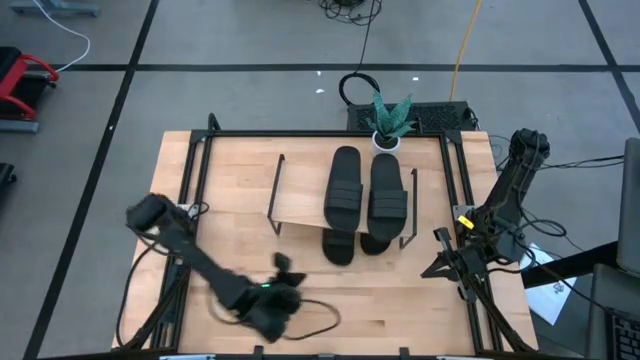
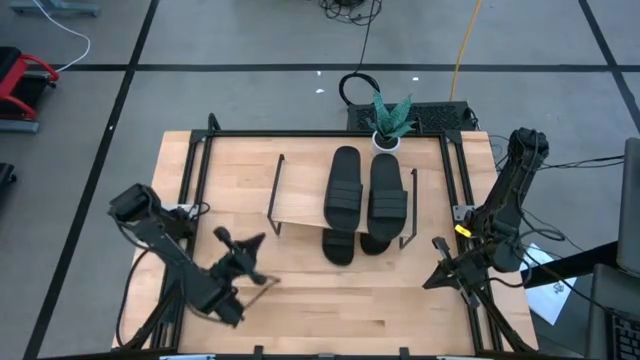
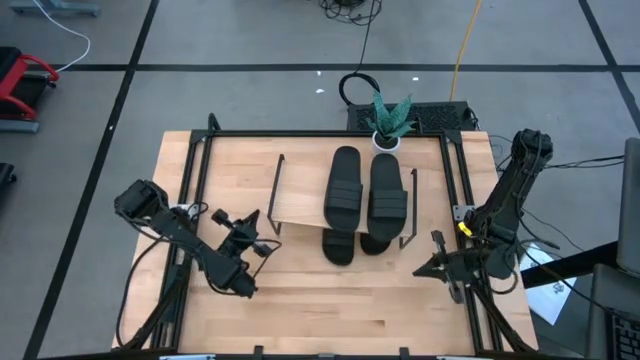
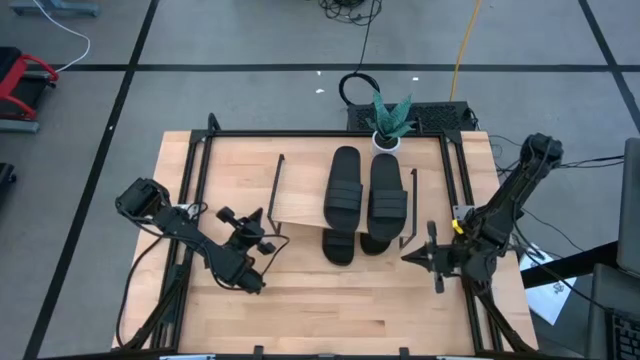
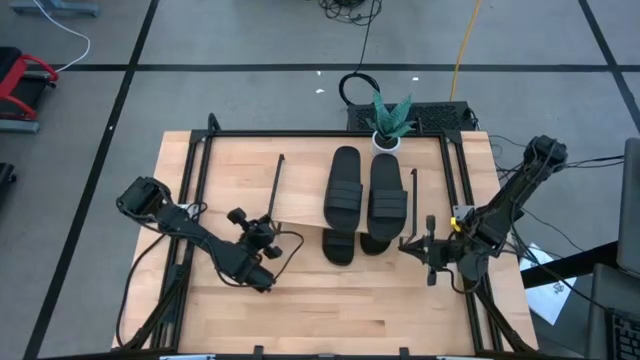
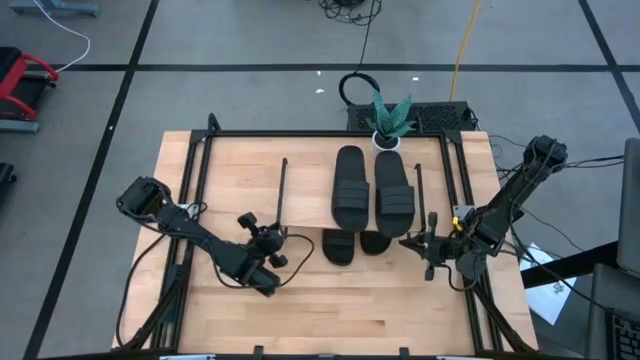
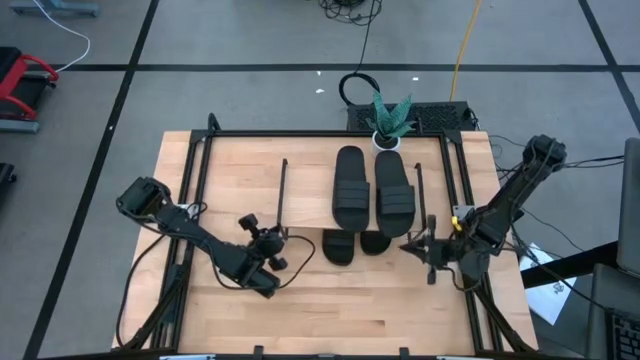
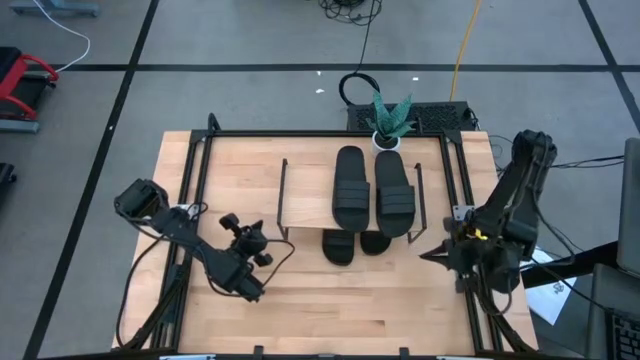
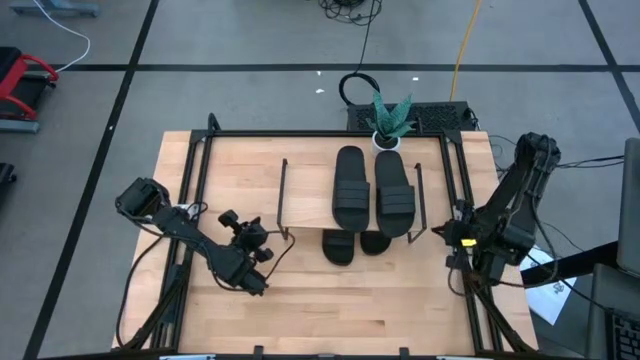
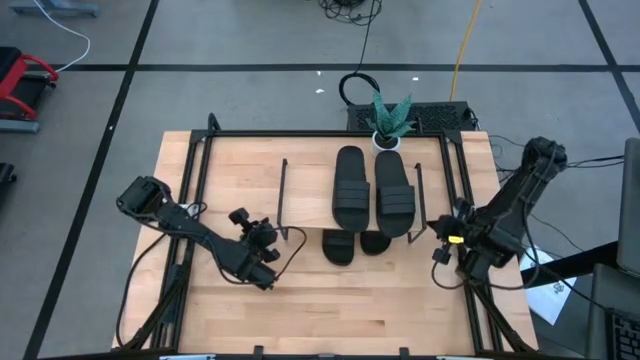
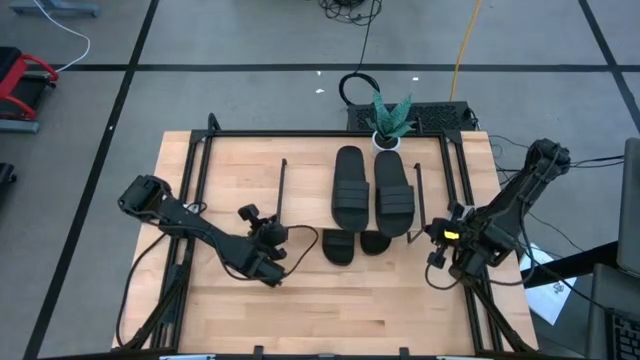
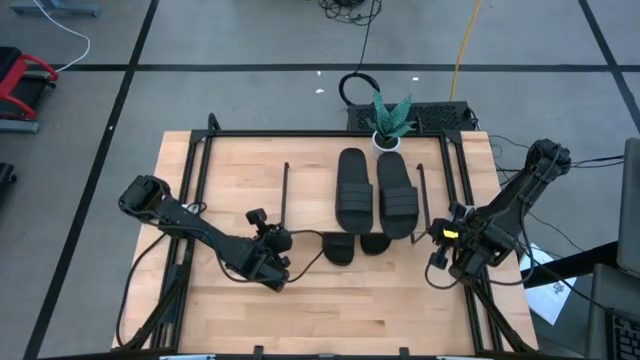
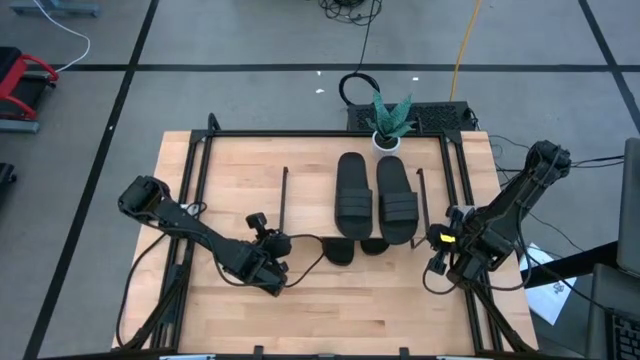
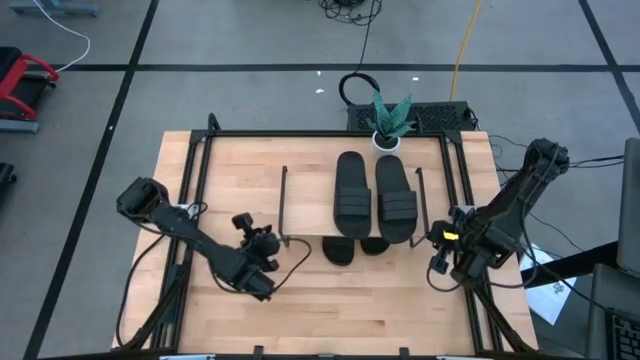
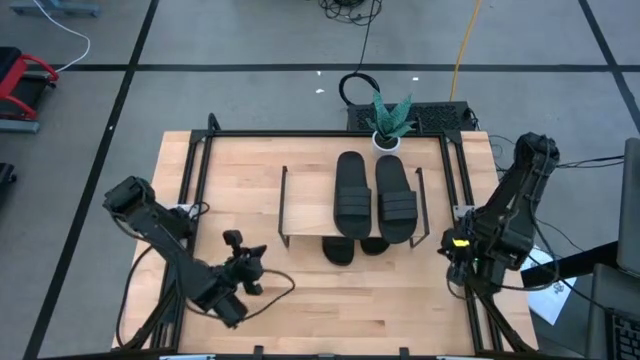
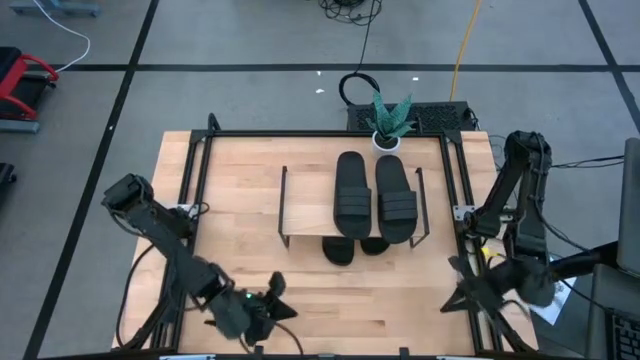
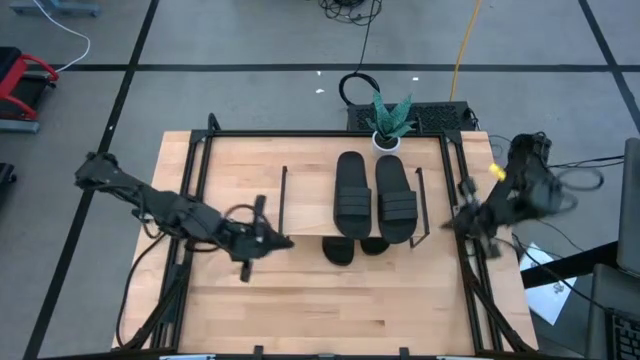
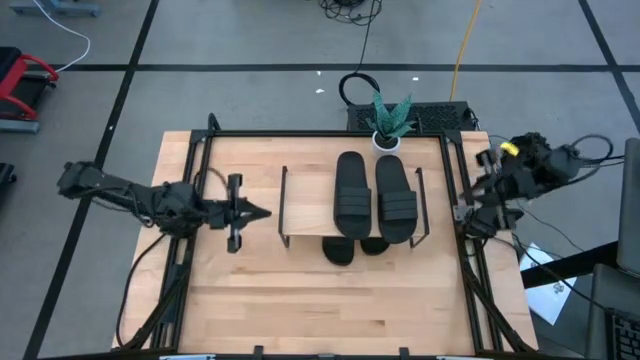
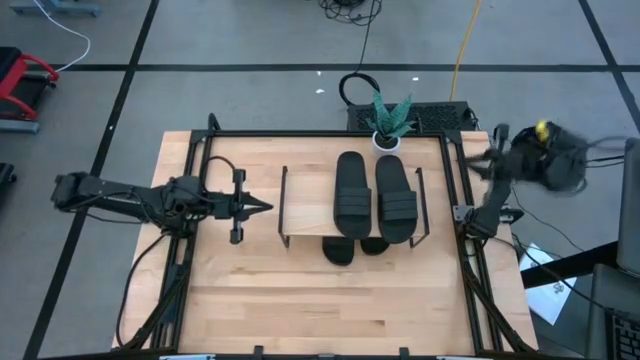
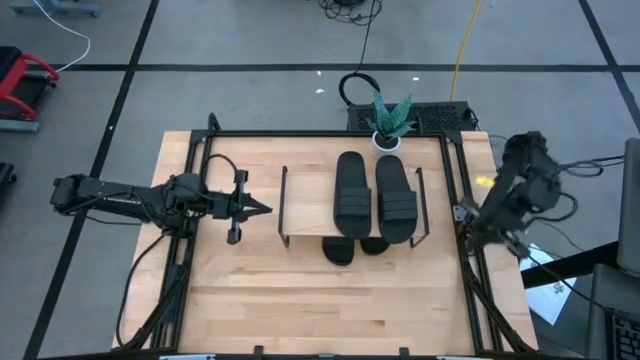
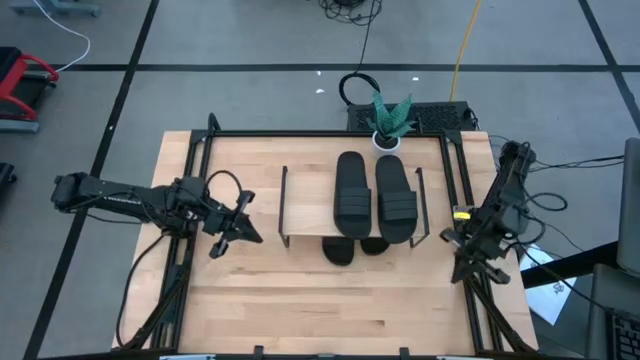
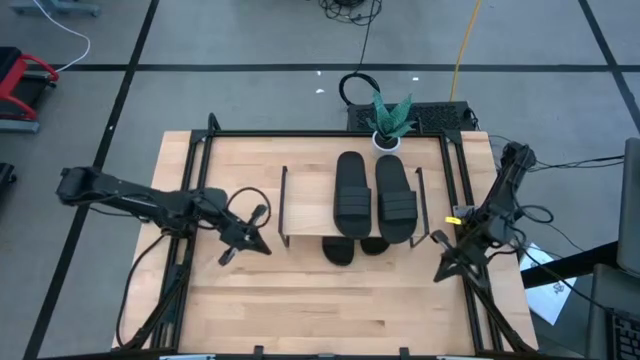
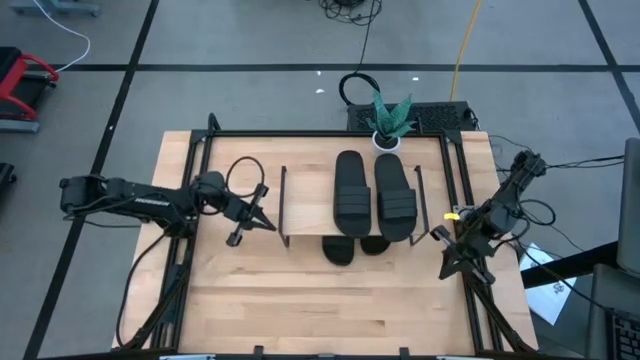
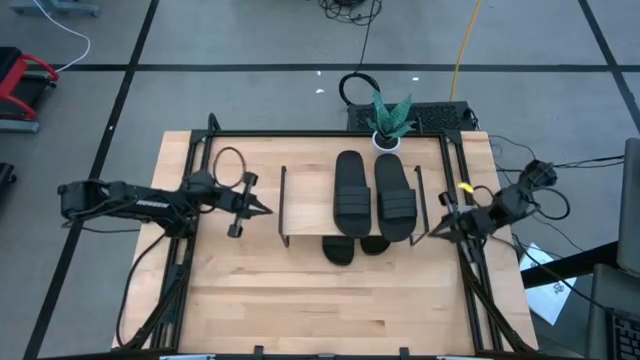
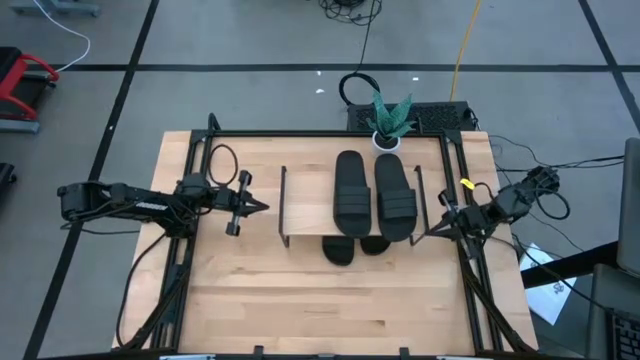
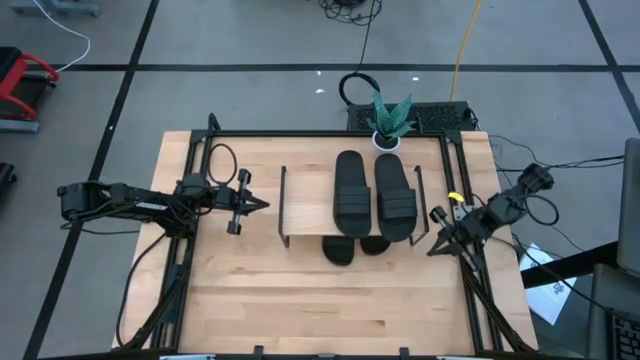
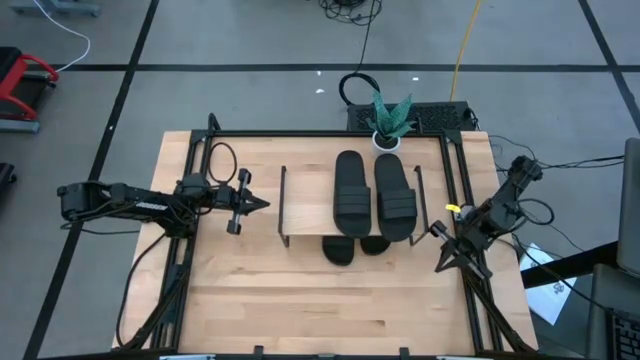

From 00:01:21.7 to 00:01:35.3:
Task: Pick and place slides into the shelf
Adjust the shelf

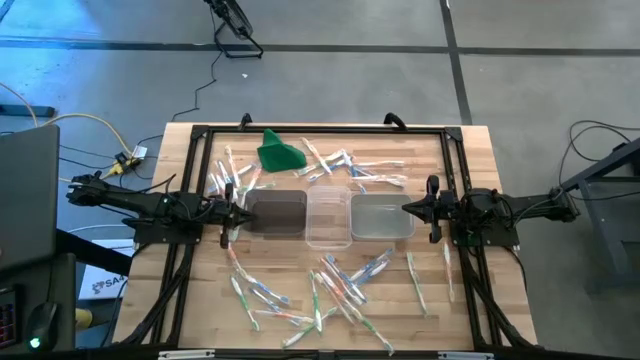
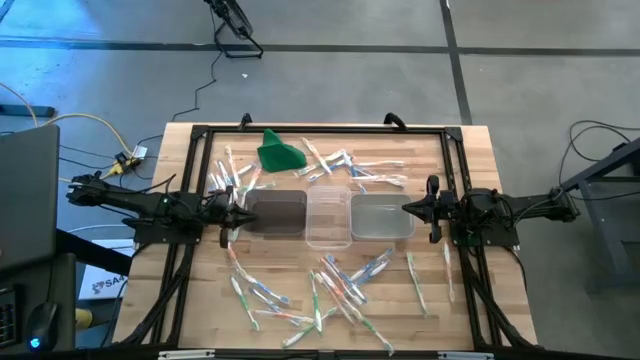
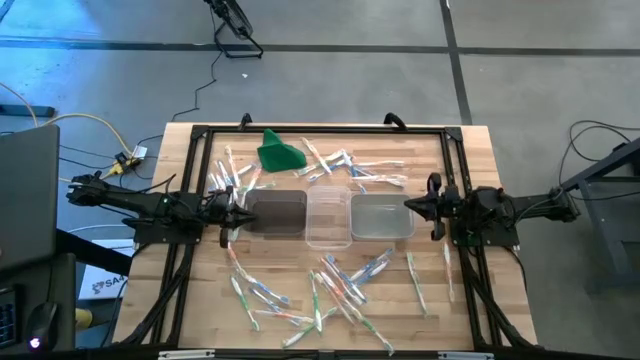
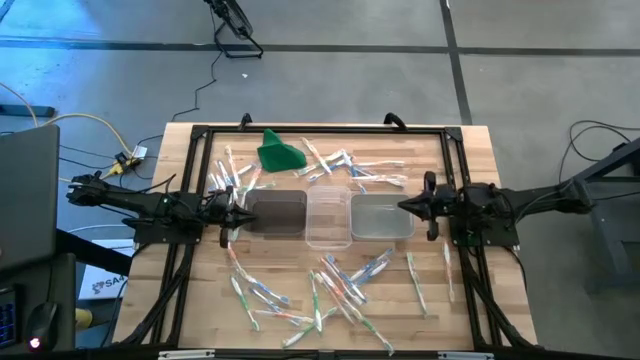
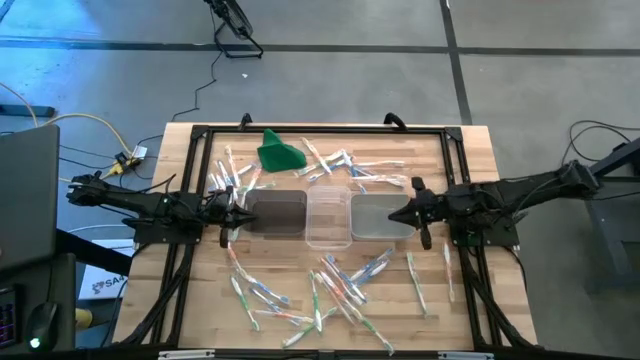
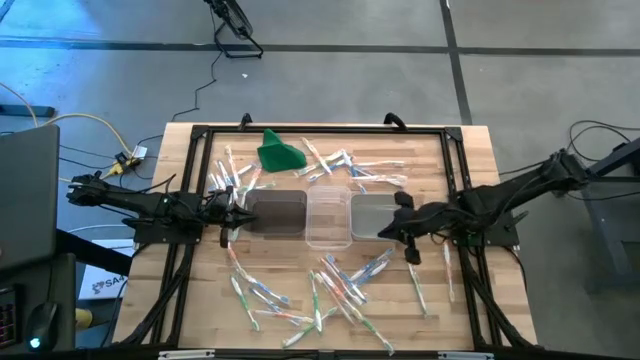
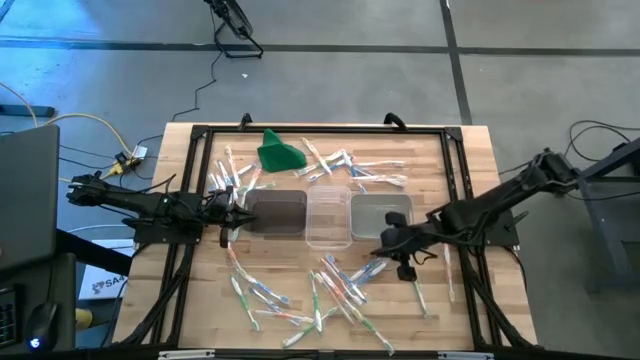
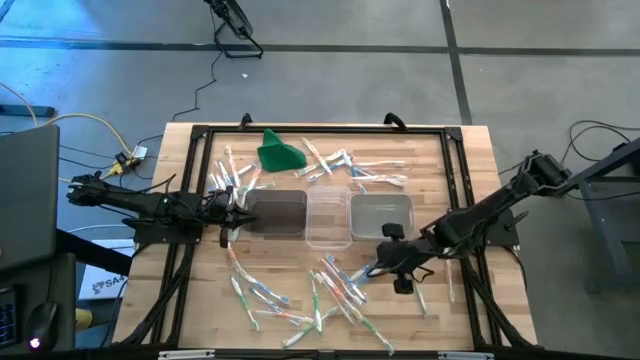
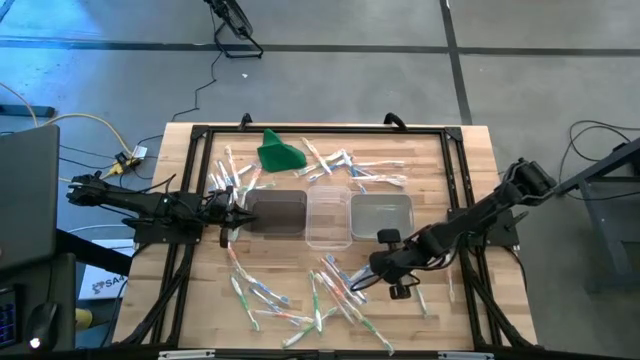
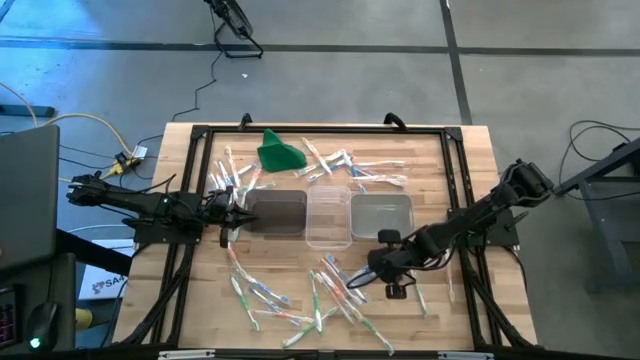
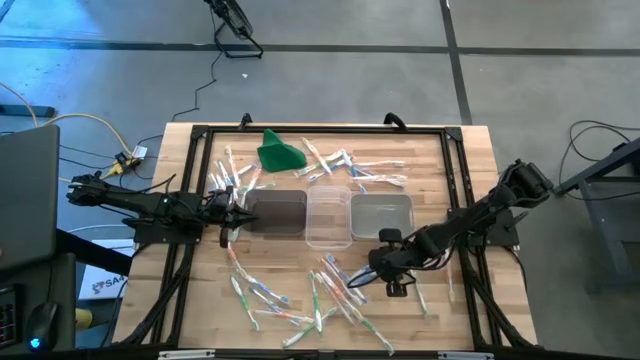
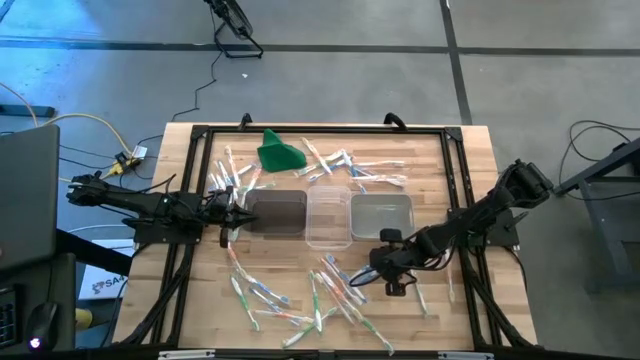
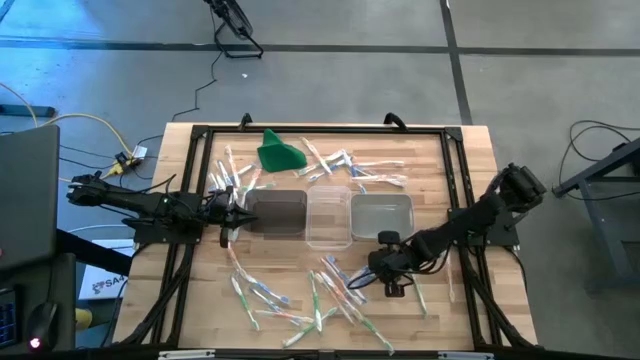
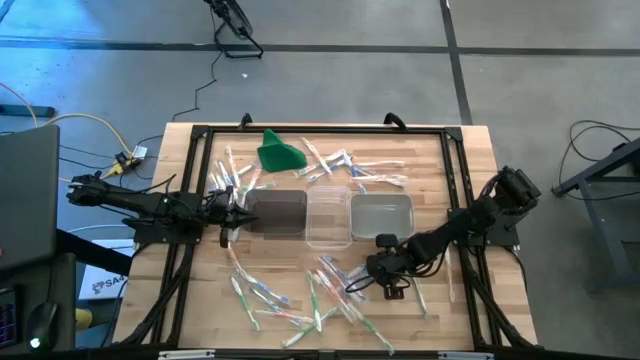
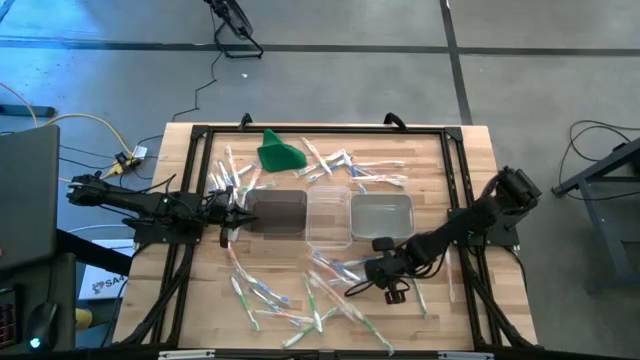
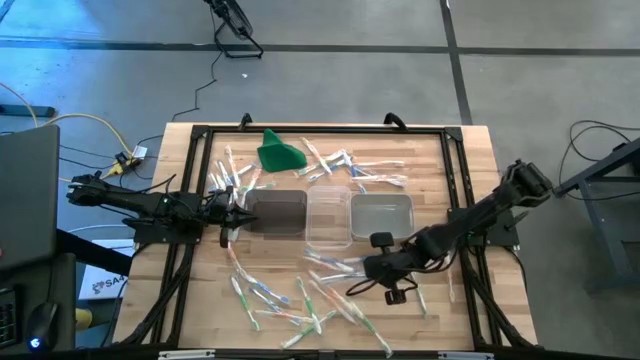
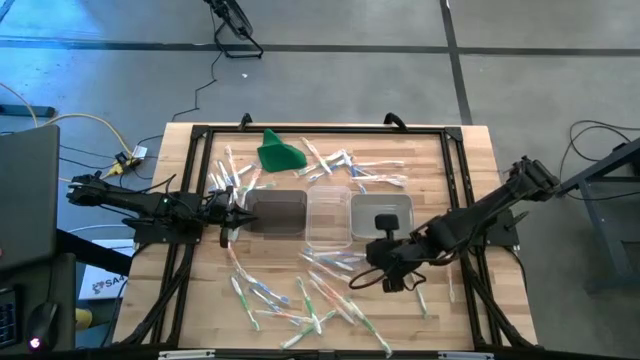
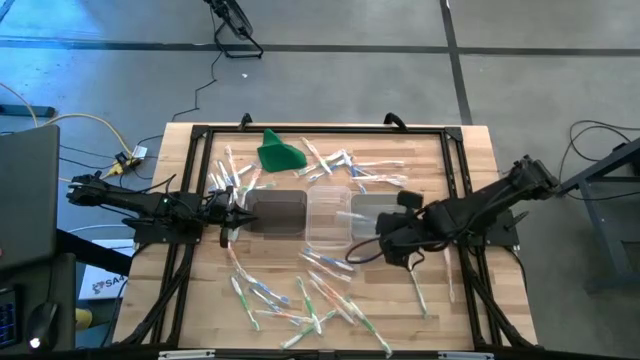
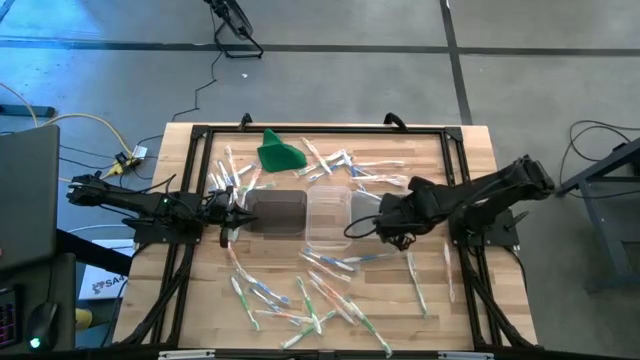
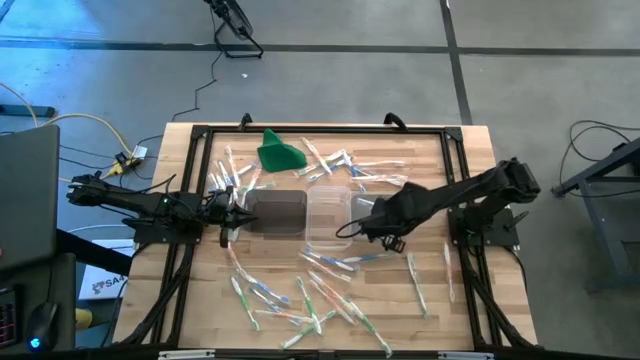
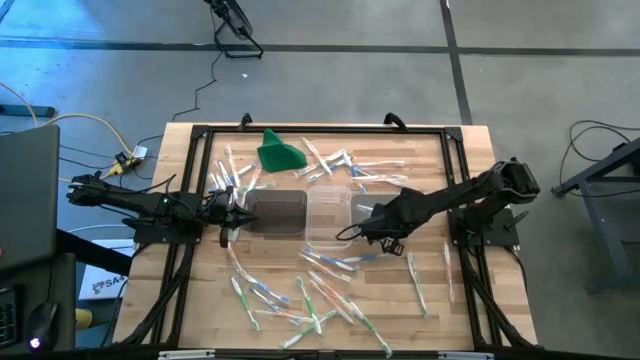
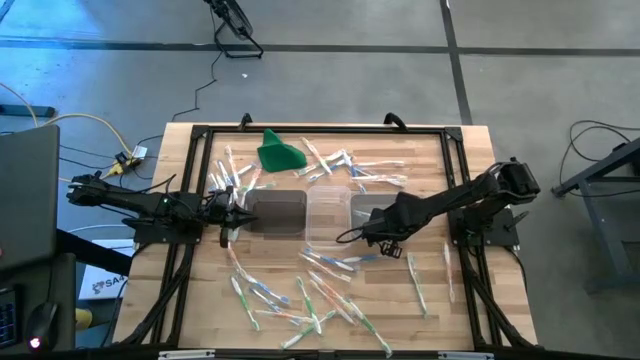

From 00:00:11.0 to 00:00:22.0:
Task: Pick & Place Toothbrushes
Put the blue toothbrush into the gray bin
